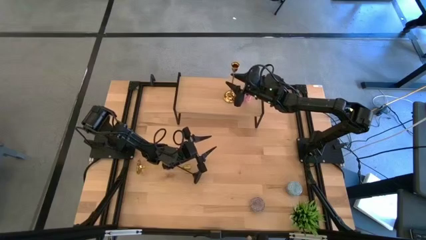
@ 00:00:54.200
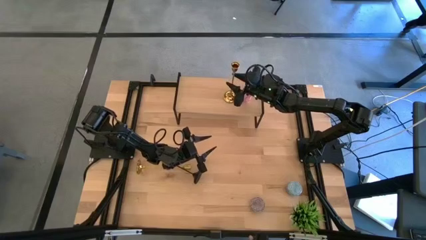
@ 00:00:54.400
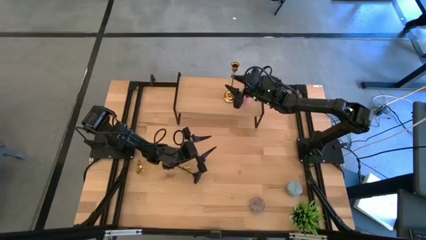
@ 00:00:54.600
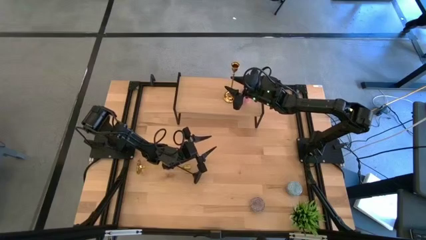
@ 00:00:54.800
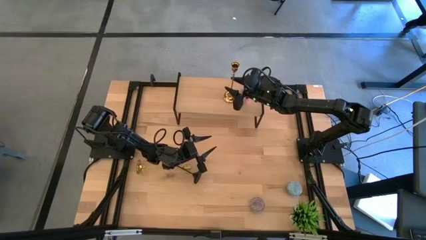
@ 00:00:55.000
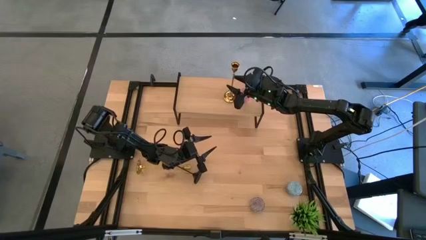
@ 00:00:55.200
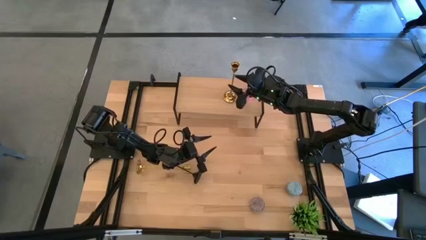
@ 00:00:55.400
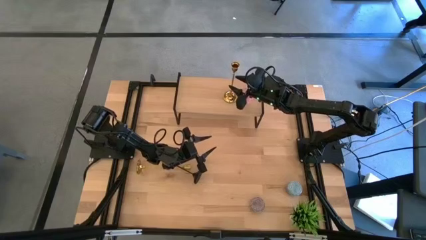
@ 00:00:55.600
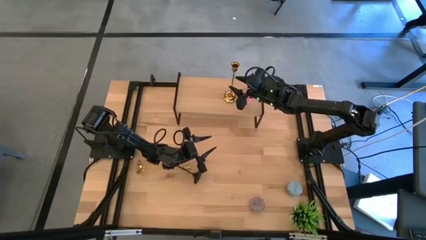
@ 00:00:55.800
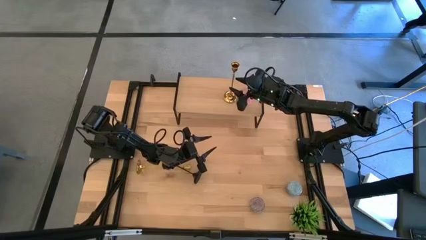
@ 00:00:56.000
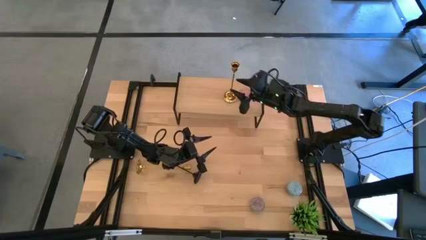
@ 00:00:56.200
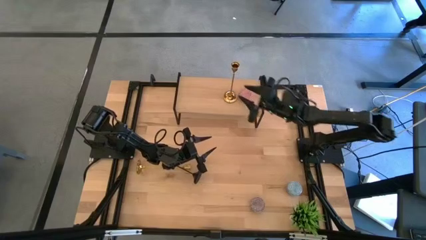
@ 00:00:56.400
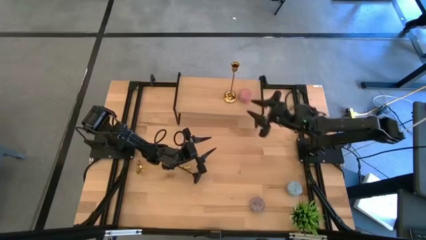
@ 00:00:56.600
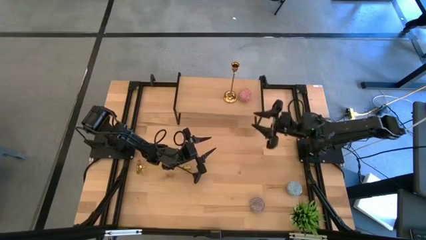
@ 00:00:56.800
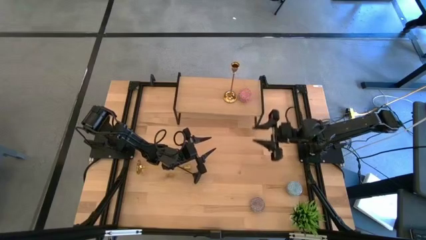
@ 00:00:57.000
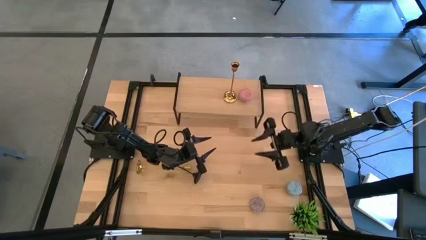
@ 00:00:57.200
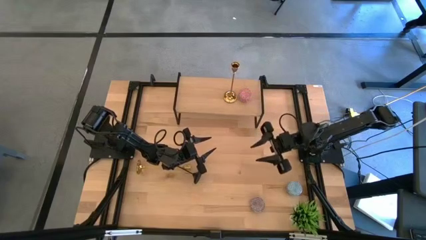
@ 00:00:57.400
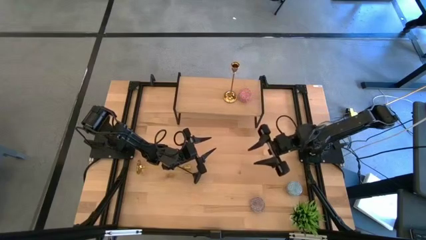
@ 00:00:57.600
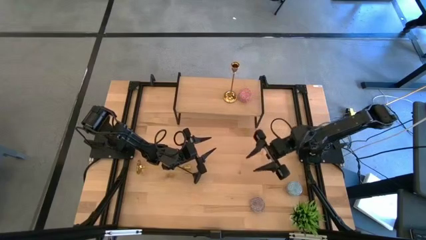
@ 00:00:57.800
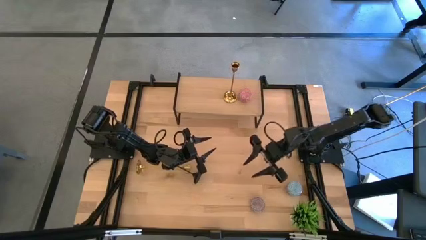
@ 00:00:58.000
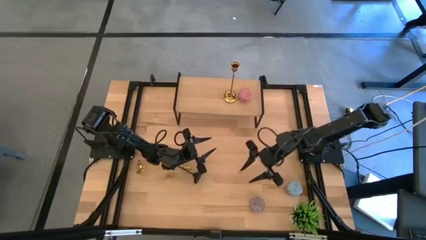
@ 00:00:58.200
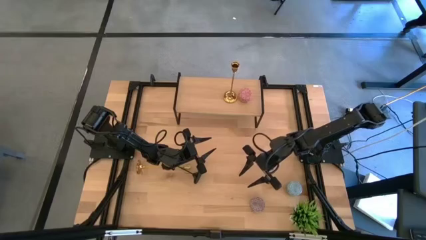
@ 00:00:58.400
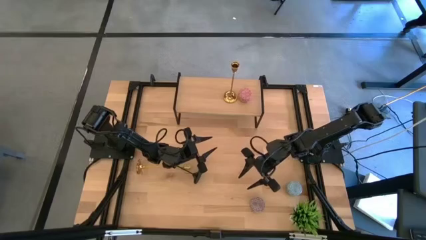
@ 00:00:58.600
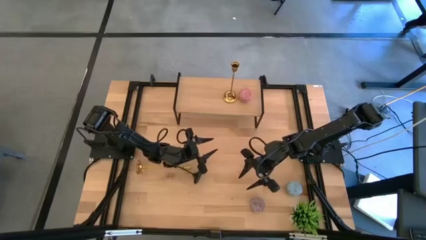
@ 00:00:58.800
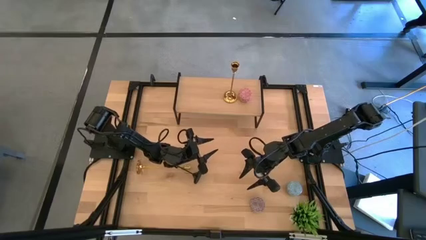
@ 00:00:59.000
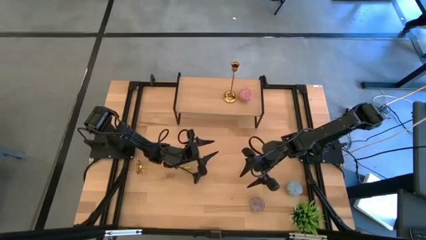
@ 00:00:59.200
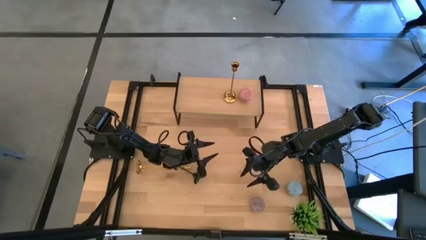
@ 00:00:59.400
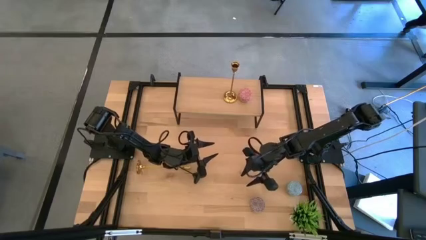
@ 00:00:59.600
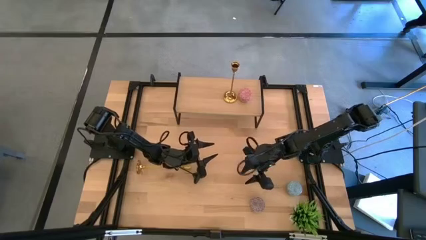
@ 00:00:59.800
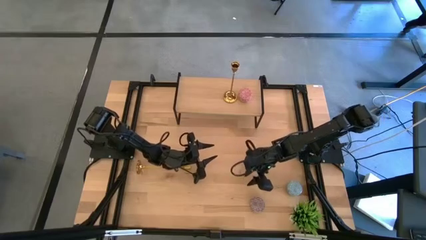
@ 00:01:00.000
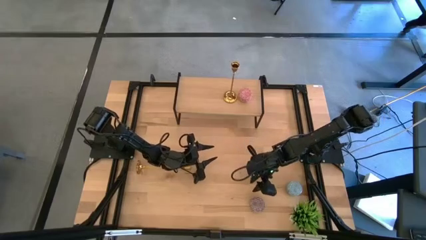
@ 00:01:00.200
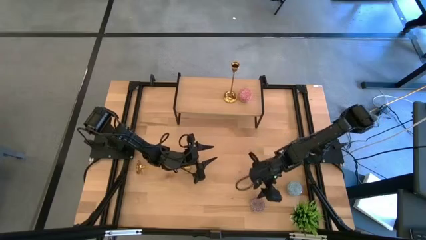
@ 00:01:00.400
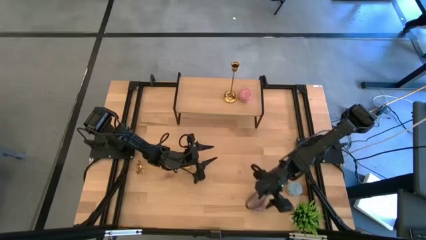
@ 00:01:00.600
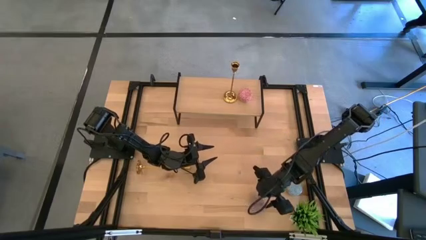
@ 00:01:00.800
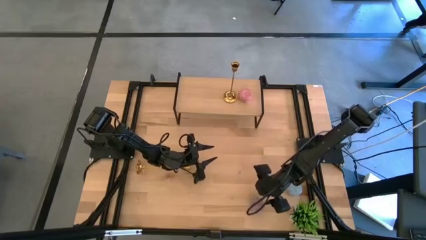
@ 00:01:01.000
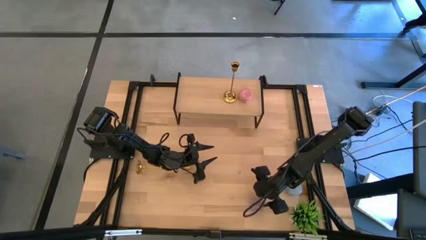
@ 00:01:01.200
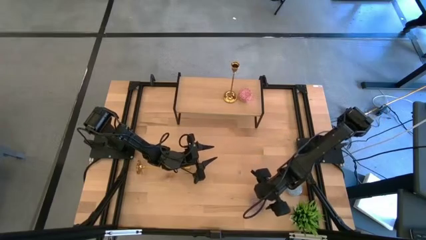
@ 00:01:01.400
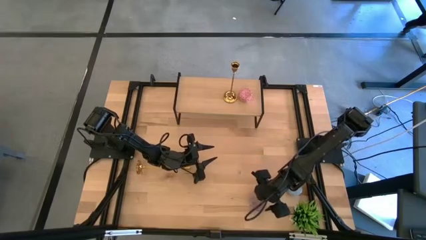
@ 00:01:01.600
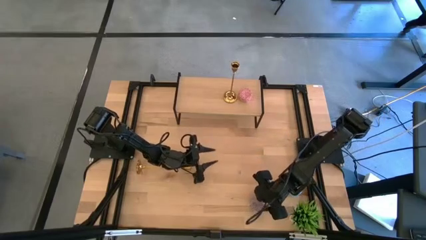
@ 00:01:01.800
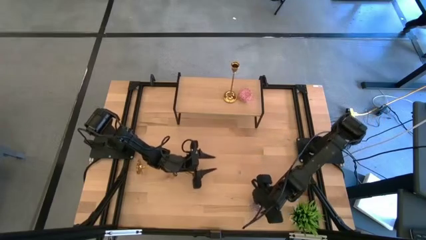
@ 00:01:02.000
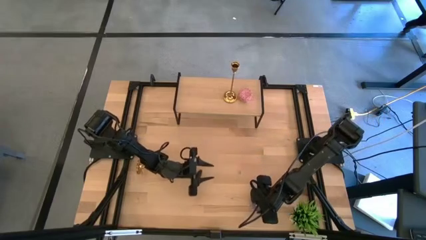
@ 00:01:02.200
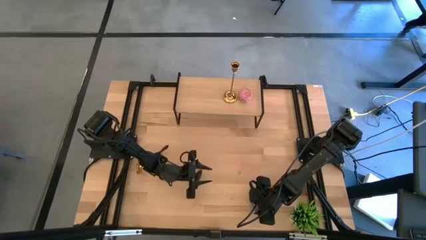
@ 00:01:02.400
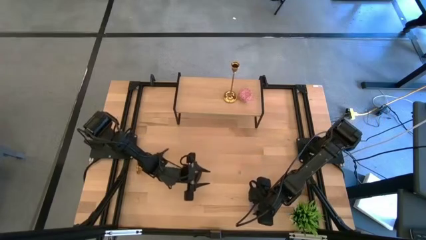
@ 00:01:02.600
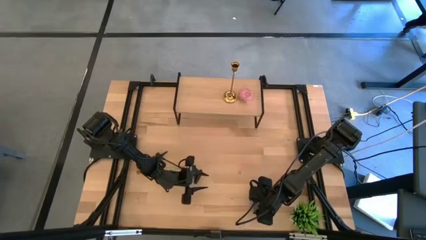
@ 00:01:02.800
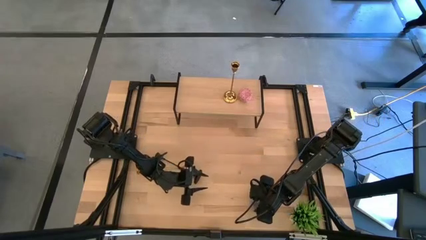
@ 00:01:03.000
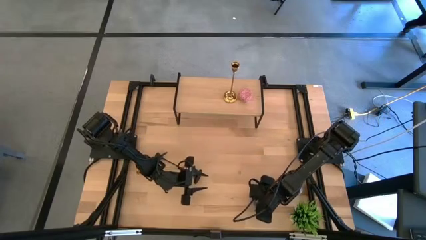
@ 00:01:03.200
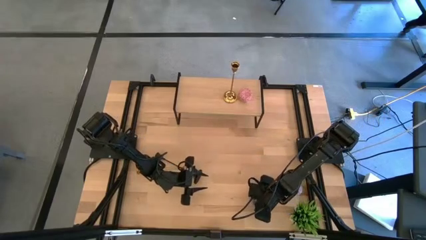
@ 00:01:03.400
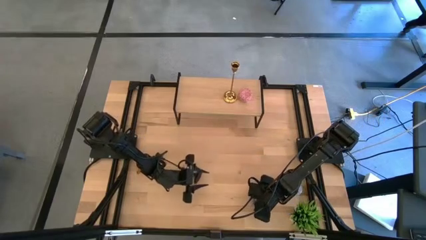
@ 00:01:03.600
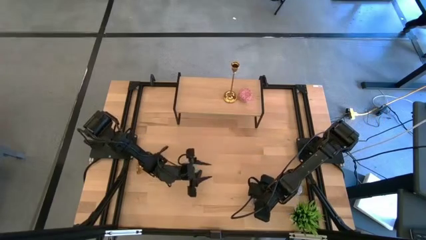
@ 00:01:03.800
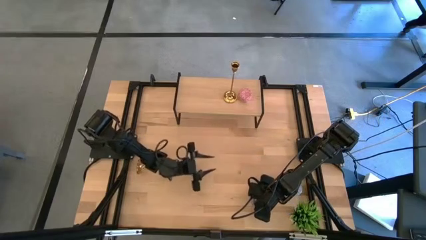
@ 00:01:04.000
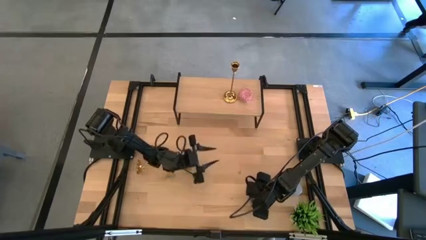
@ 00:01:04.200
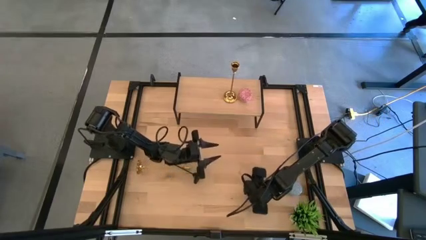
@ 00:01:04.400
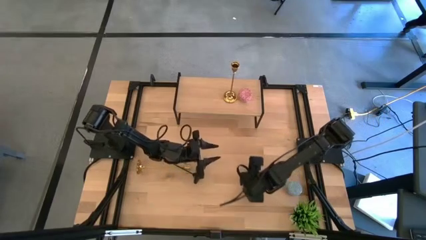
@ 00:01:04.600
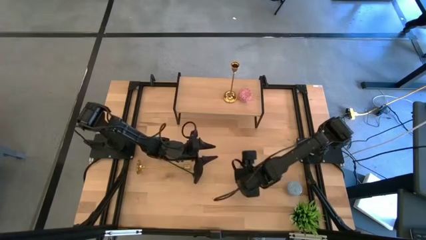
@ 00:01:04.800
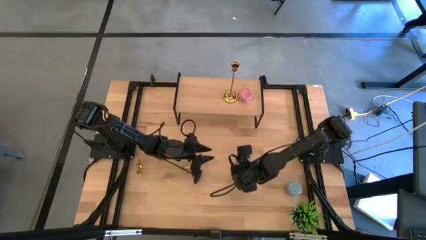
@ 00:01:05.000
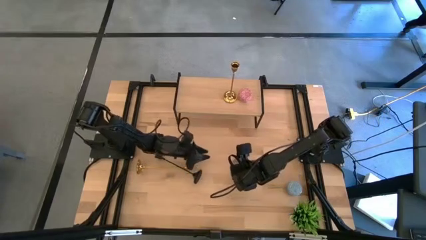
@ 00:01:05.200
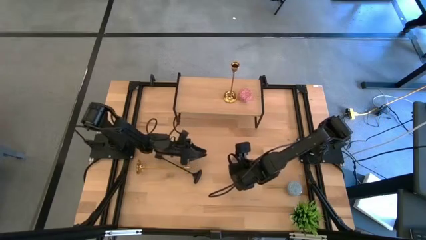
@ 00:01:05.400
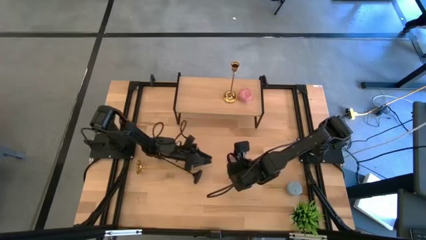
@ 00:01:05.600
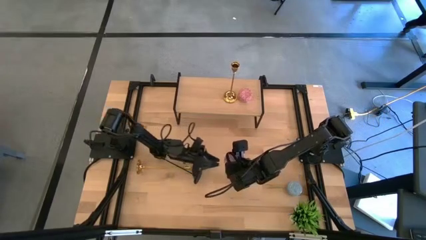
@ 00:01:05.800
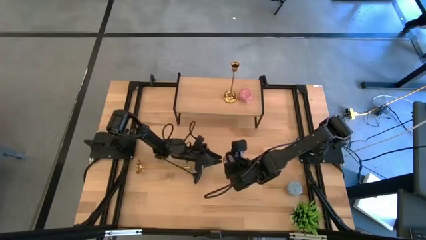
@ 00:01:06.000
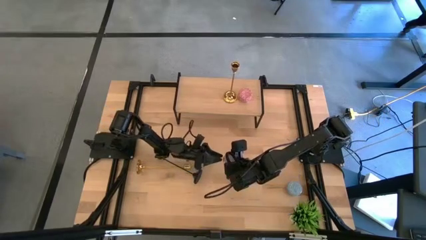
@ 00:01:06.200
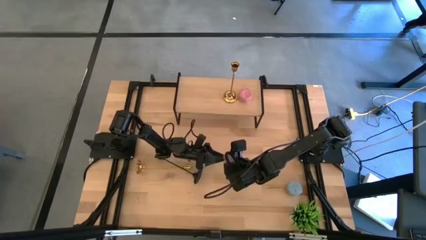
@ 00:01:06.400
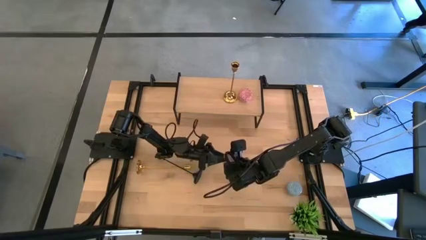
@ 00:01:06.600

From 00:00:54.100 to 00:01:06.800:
Task: Pick & Place candle stick holders
Put the red scented candle on the shelf
